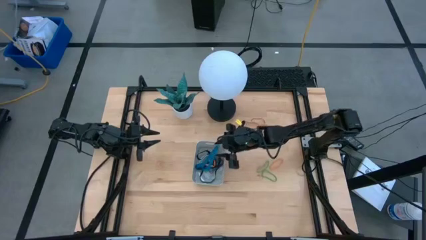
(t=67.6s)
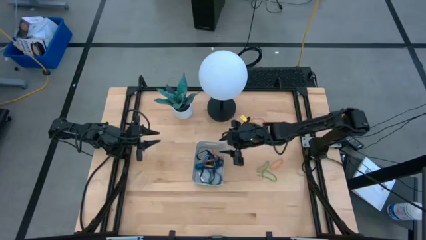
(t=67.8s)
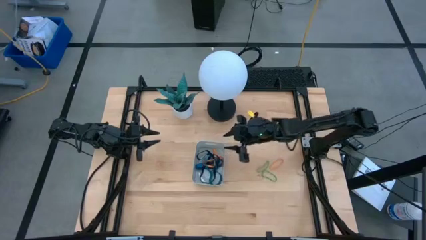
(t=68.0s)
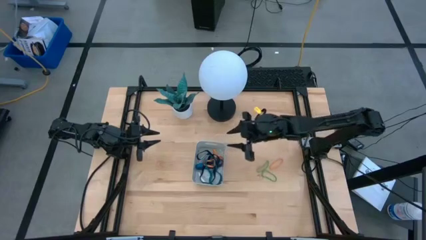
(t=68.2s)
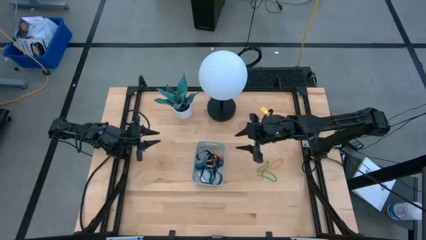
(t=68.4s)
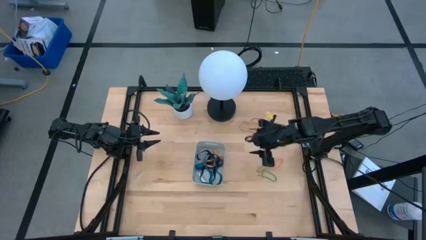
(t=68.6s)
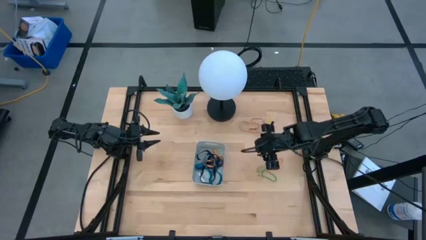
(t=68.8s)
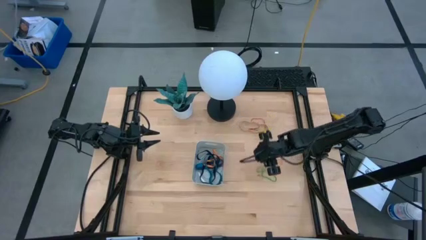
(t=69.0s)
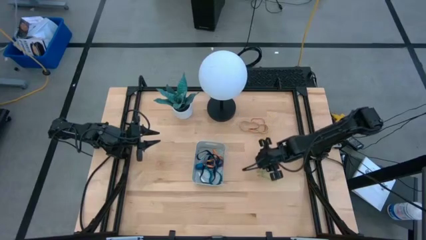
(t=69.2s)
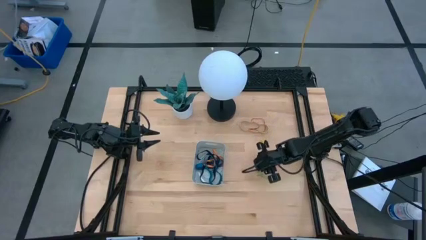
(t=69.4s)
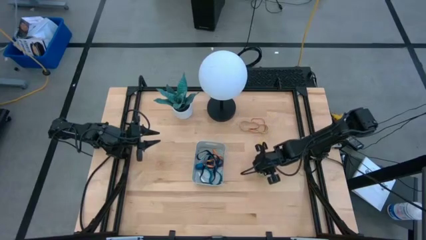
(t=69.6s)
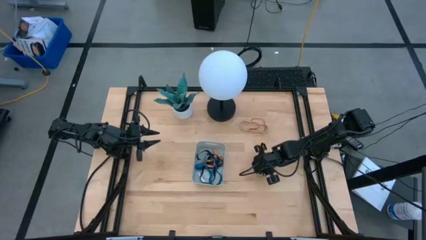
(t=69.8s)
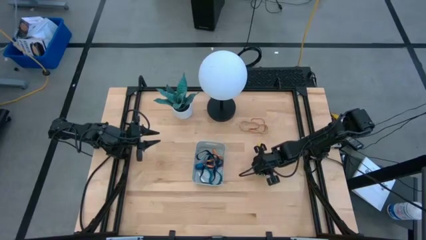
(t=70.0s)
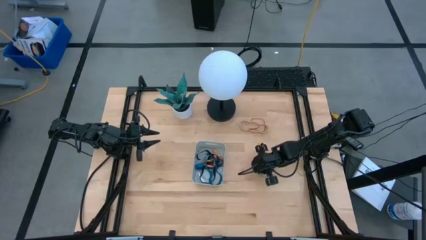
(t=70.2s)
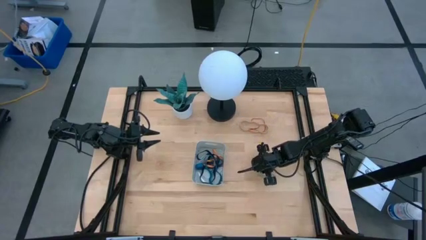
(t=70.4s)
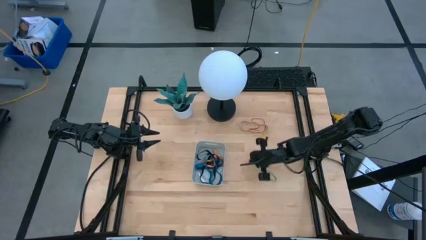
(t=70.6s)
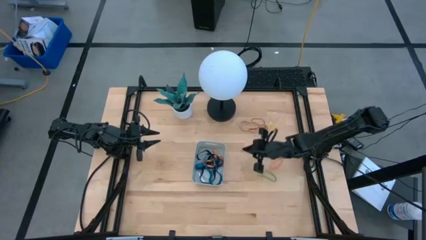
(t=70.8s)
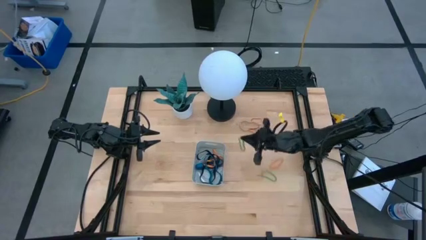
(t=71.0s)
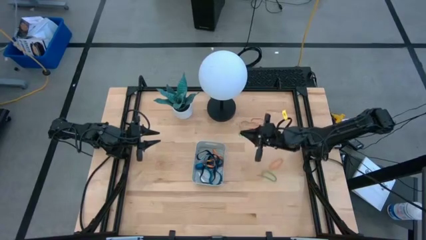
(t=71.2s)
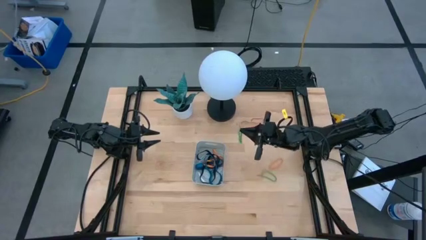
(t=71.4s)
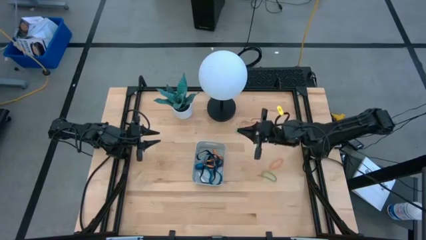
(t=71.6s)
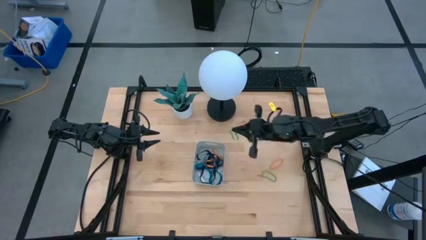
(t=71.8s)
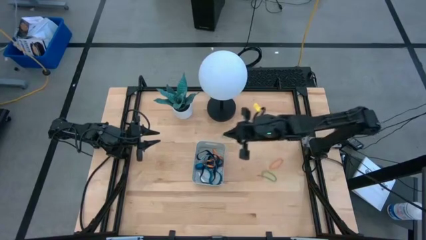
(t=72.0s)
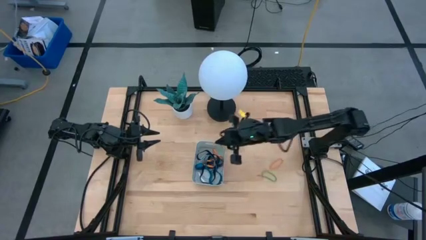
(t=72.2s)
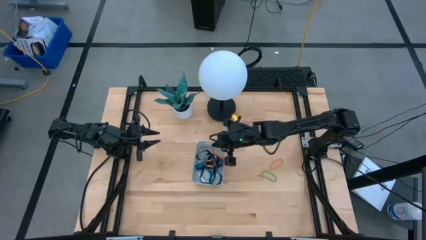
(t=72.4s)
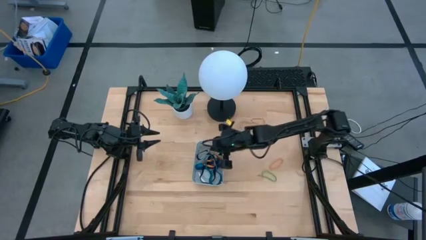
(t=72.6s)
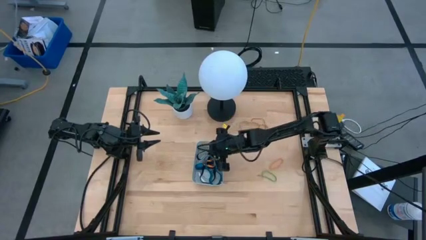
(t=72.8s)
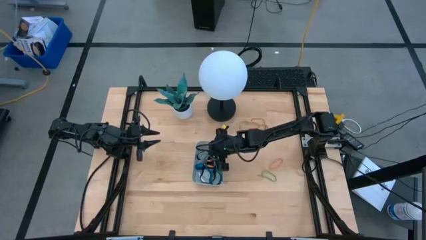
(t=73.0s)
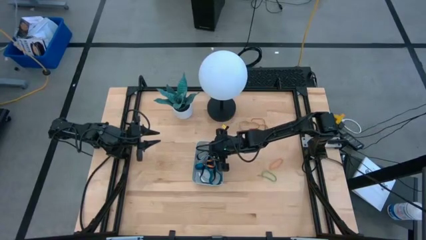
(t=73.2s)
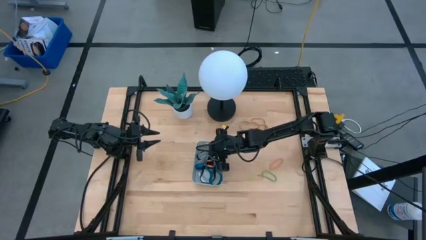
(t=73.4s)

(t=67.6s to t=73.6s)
Task: Pick and place rubber bands into bin
Put the top green rubber band into the gray bin

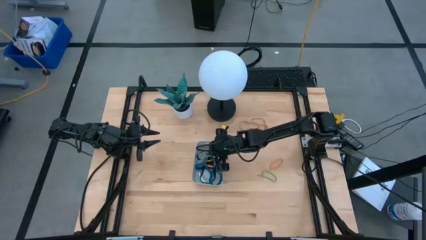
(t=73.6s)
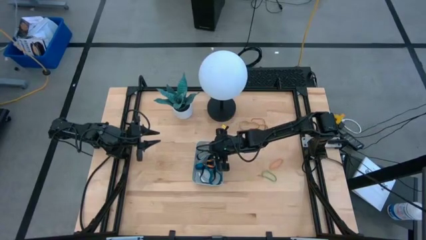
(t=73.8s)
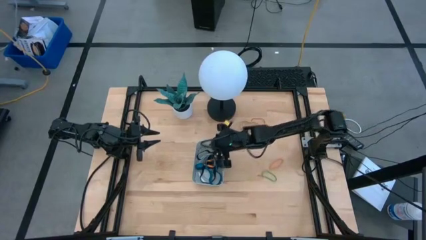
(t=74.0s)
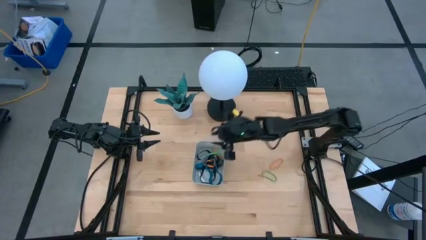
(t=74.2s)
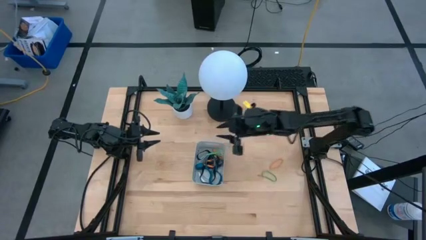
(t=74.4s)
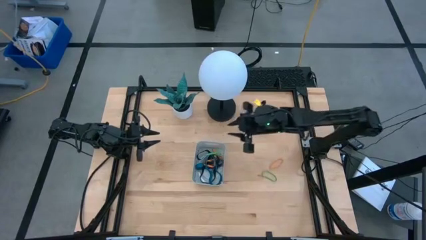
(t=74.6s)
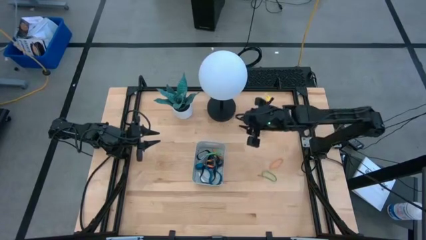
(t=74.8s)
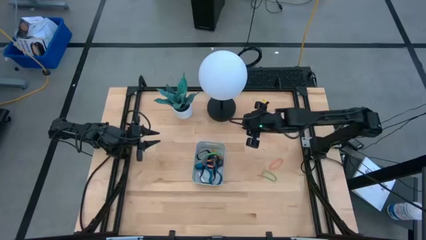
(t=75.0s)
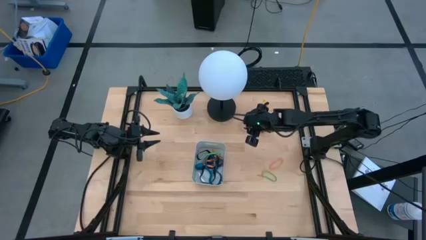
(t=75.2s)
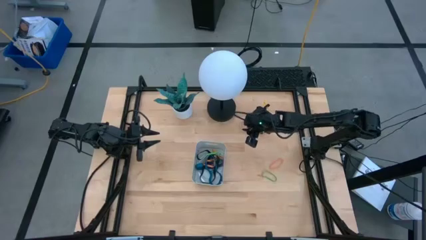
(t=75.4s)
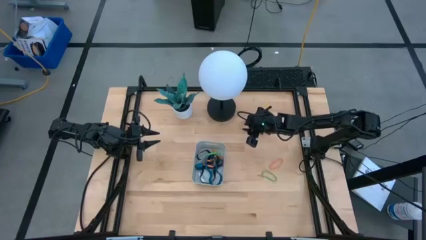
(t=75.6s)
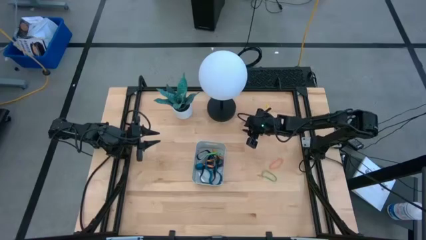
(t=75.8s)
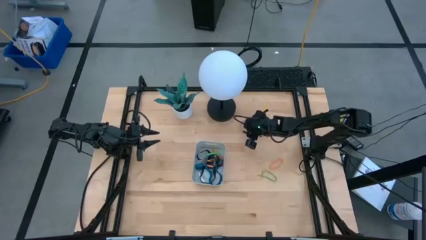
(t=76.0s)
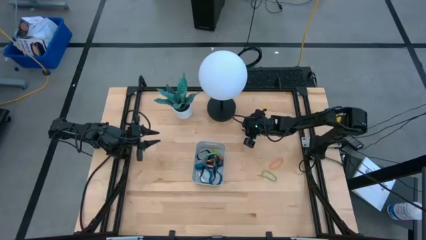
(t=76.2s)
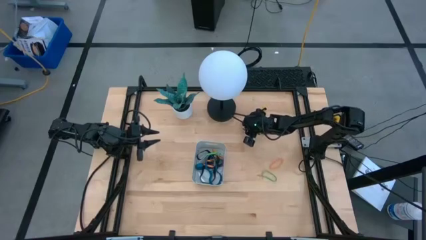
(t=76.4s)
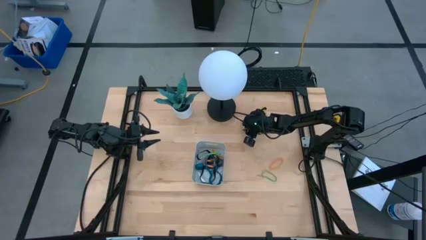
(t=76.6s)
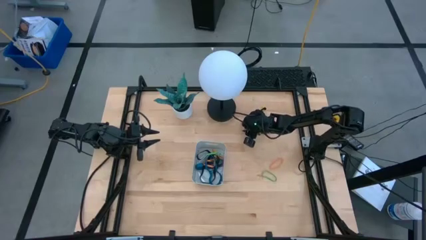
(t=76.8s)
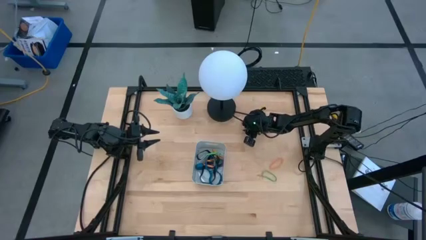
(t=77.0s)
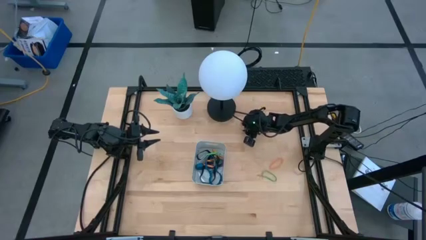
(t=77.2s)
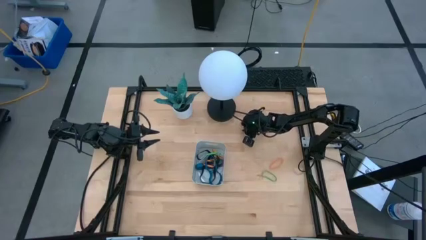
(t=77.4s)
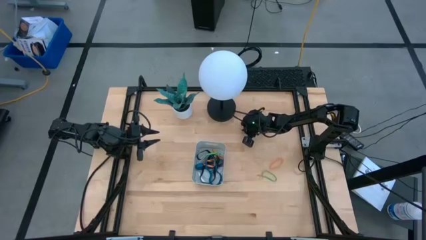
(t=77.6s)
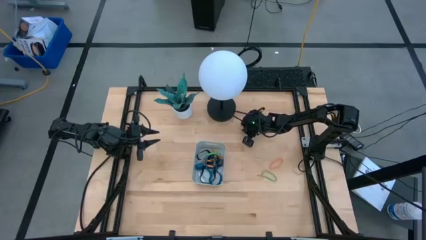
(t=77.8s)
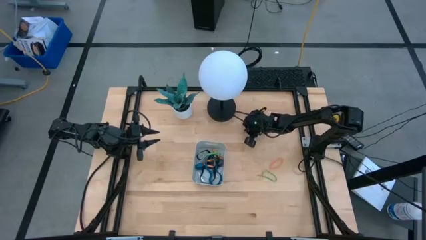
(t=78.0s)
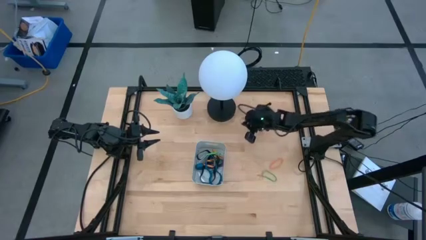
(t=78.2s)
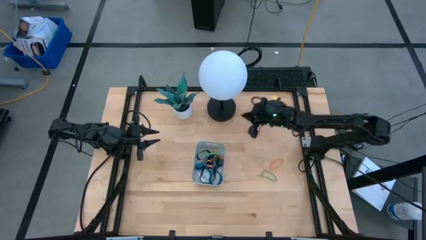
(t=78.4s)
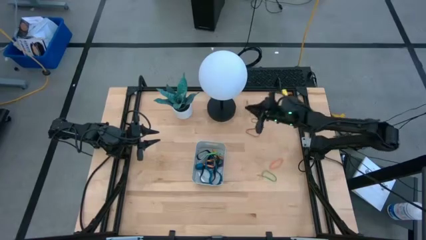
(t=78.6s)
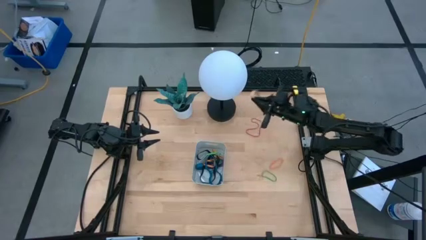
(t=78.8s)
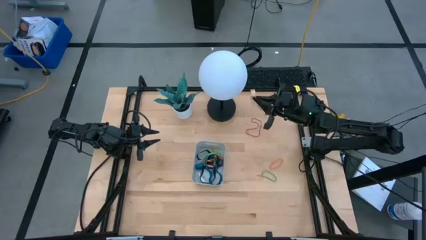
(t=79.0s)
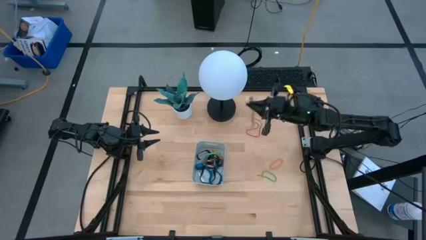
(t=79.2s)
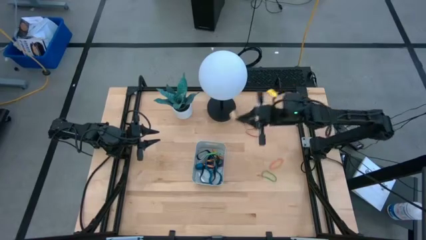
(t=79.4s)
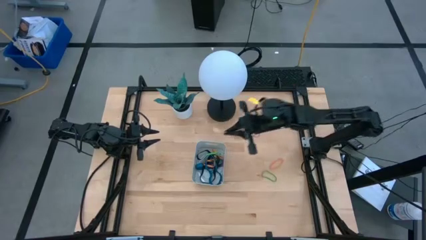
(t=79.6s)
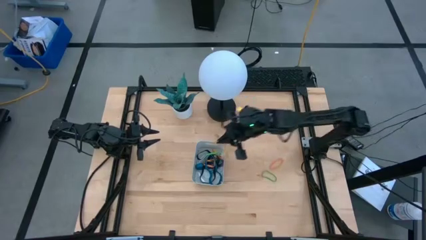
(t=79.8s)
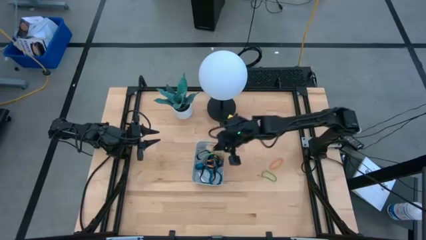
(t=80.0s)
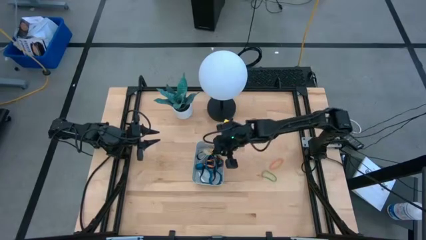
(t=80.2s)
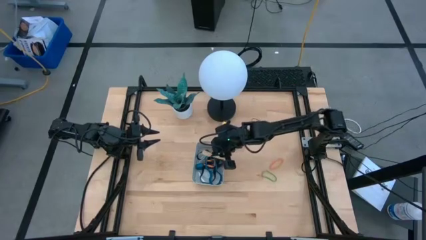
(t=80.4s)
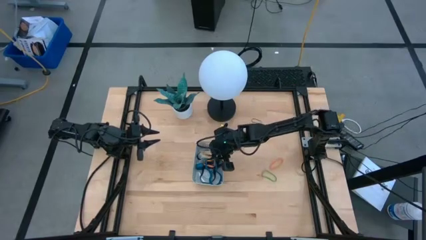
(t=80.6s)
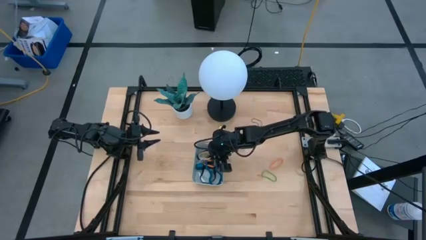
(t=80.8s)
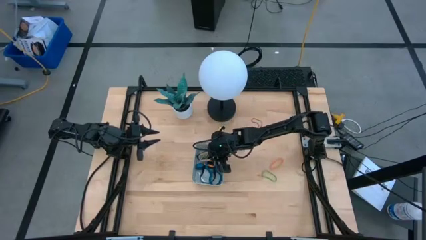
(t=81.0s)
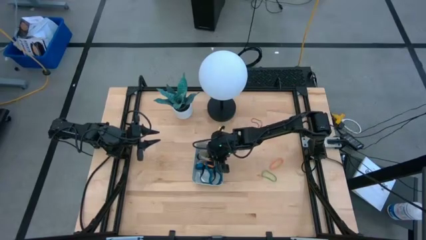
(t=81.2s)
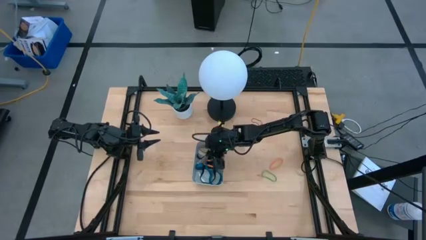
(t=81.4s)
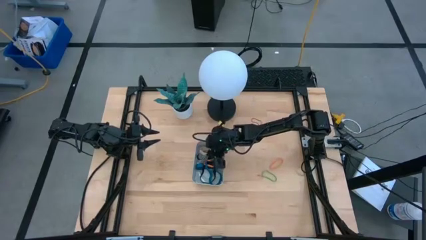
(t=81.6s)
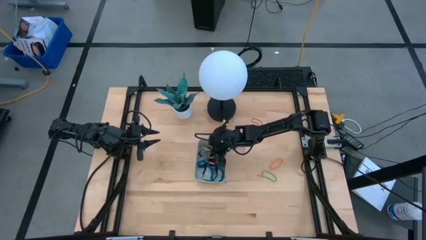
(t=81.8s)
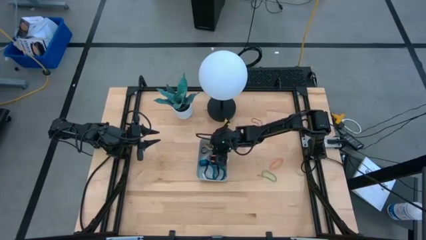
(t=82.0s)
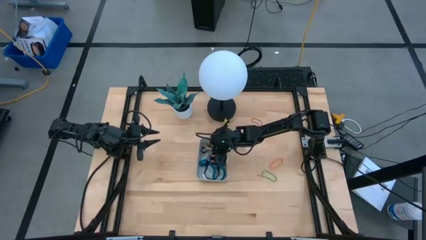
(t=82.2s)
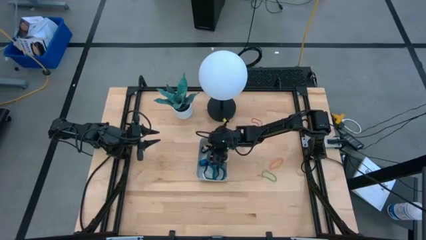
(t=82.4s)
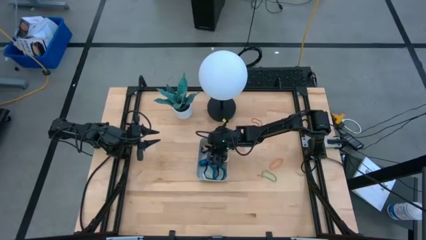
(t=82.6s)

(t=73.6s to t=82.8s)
Put the brown rubber band into the gray bin
